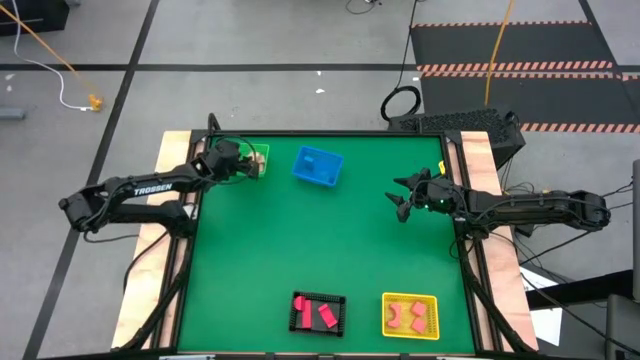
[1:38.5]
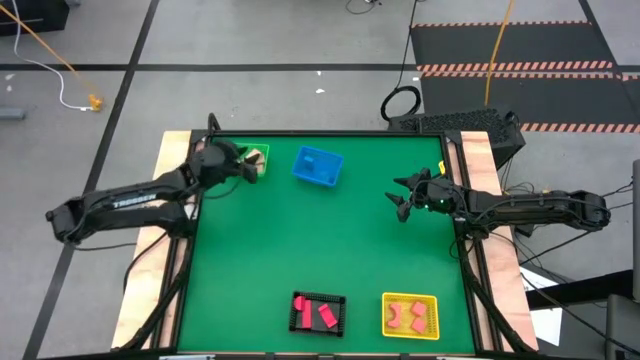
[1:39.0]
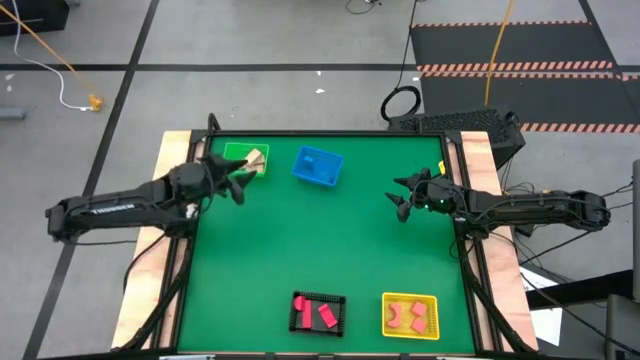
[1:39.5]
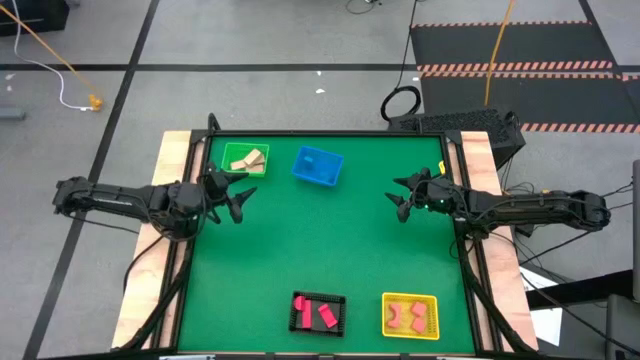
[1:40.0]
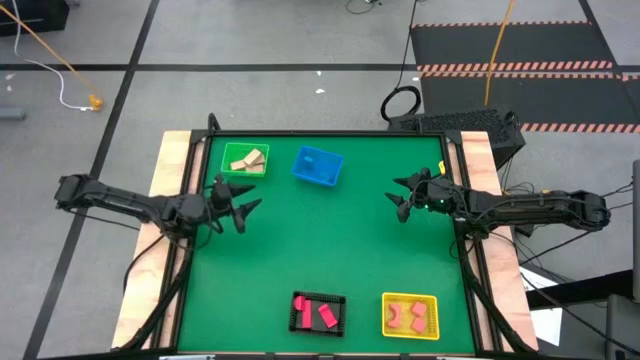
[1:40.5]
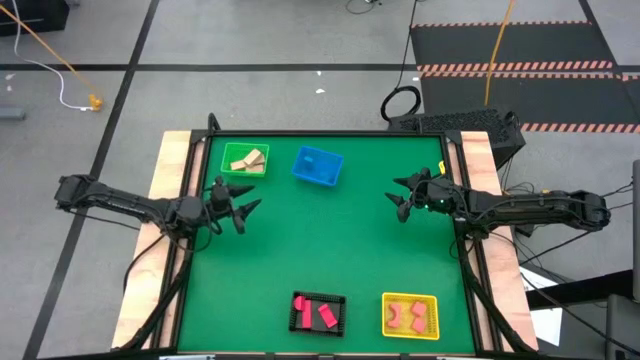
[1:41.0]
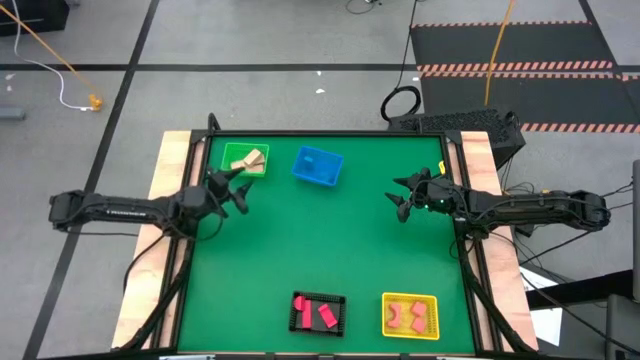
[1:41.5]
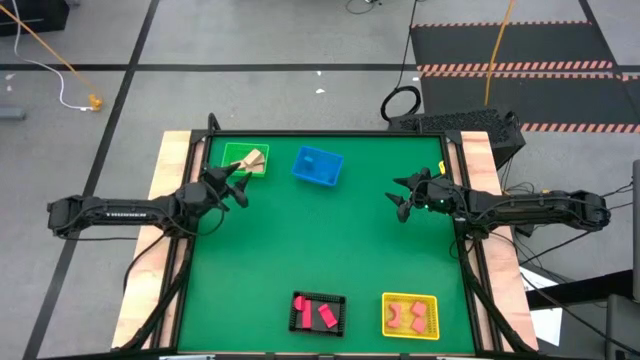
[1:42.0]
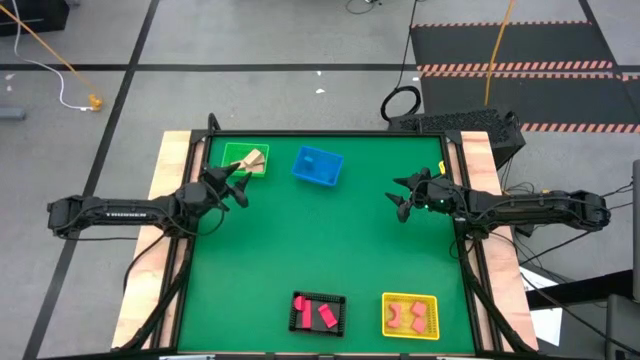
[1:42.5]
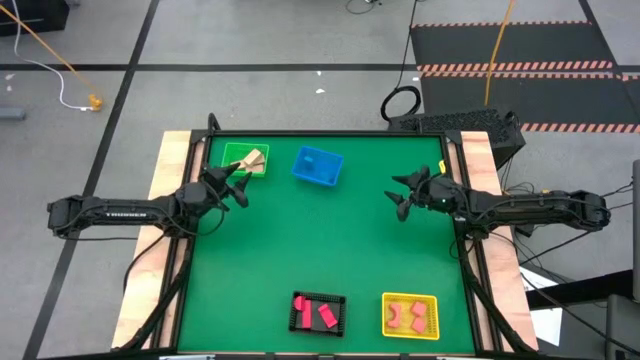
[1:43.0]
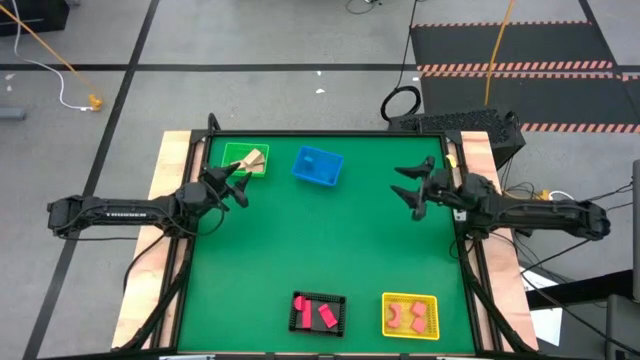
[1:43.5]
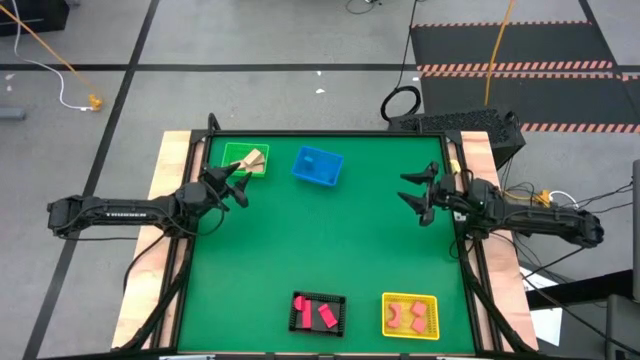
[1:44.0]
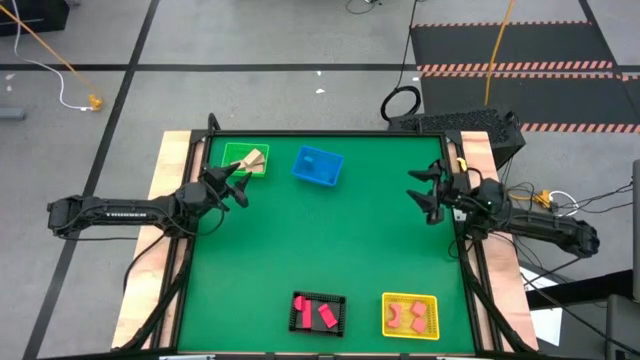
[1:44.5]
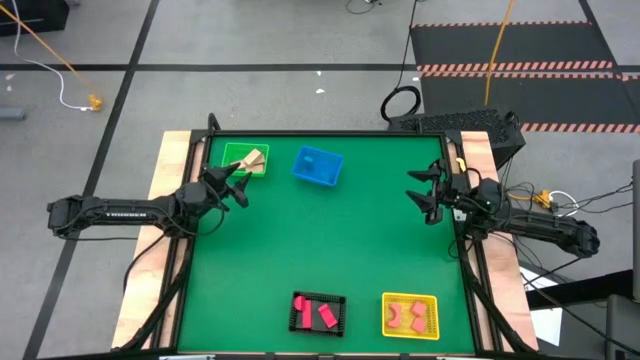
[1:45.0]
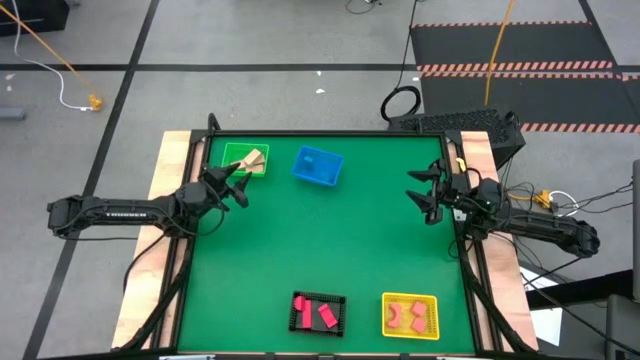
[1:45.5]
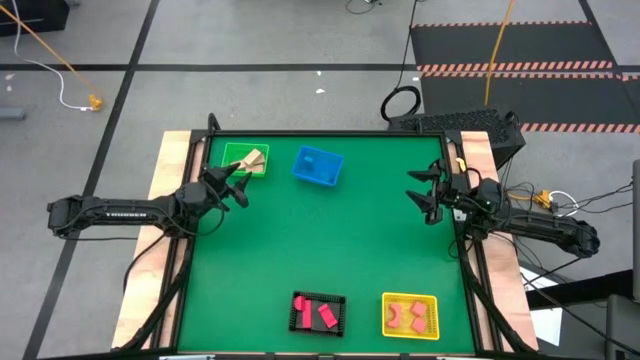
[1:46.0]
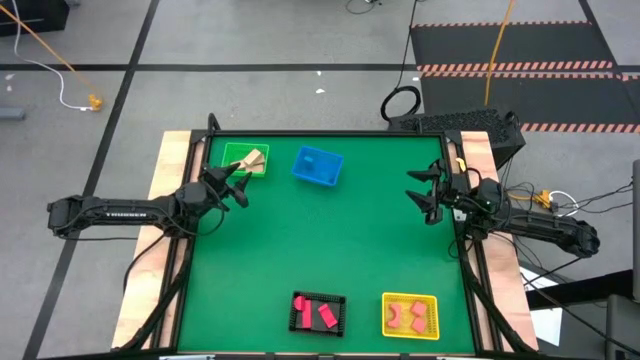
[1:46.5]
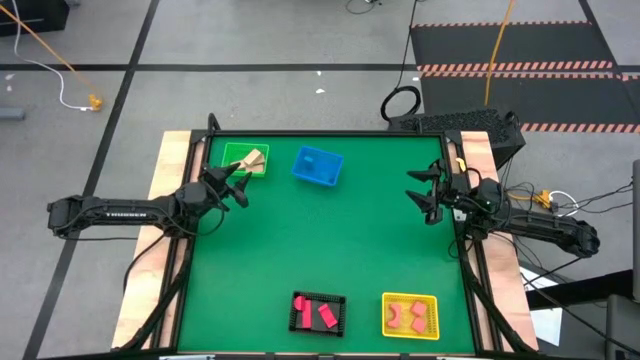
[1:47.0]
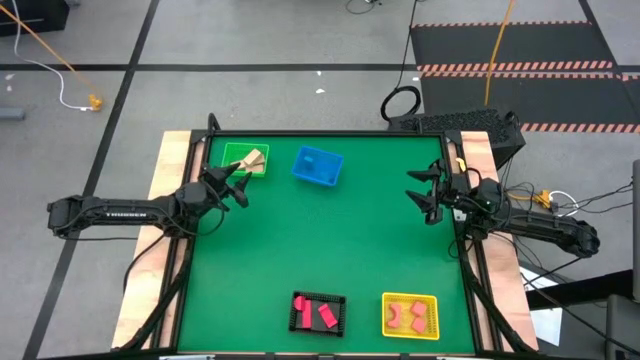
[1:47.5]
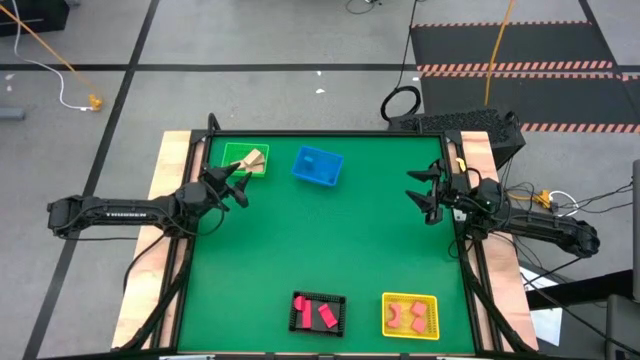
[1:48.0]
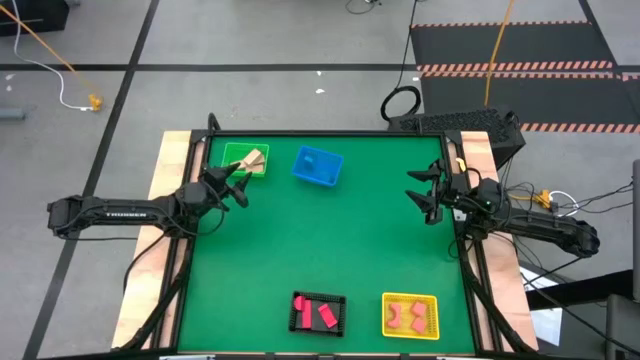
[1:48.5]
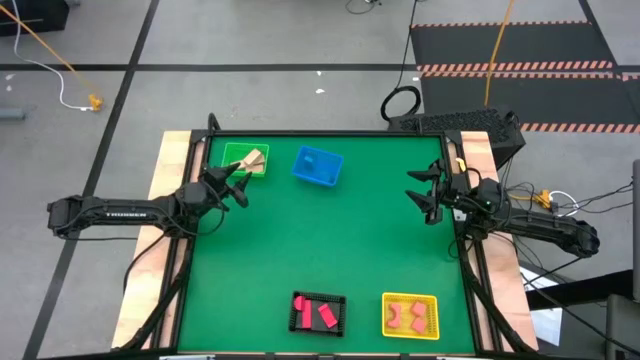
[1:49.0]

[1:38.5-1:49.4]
Task: Sort & place blocks by color
Return to Home Position

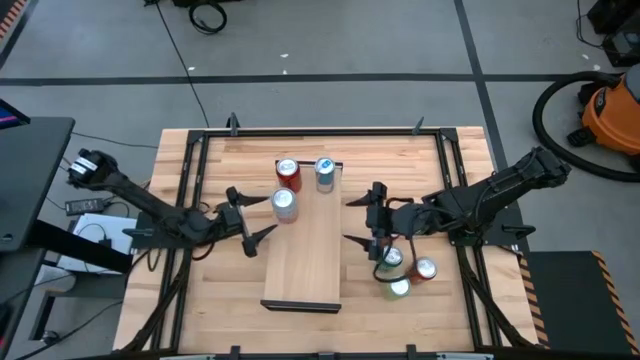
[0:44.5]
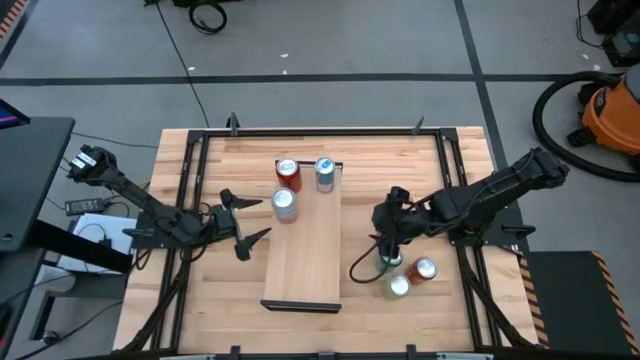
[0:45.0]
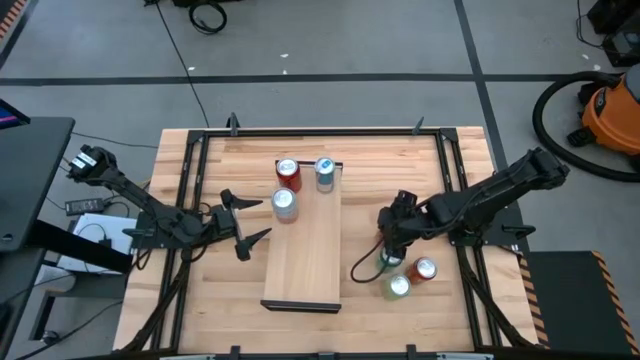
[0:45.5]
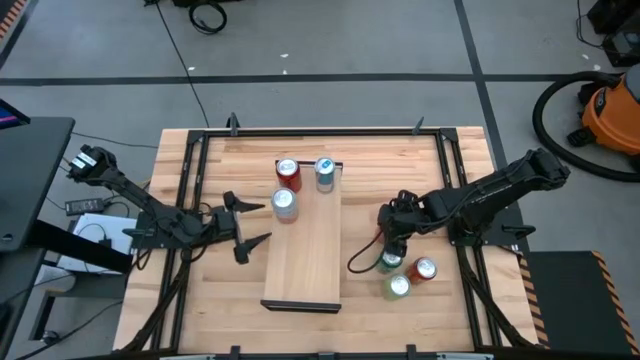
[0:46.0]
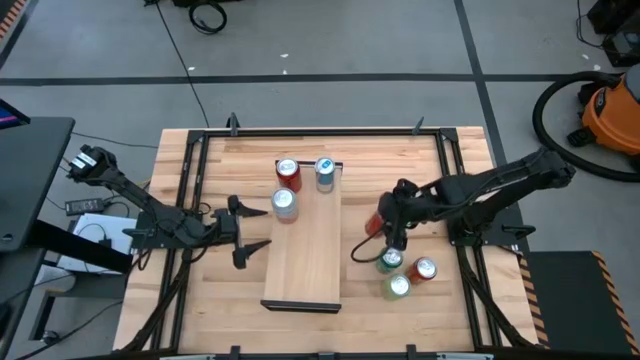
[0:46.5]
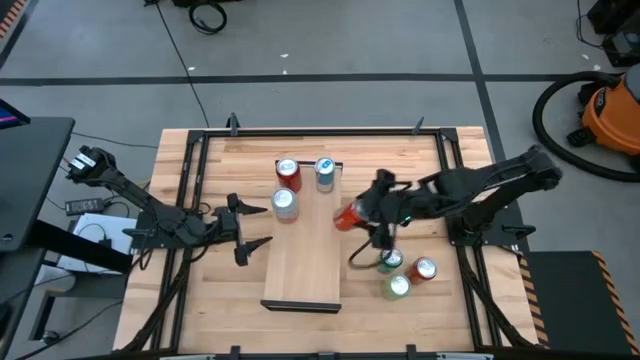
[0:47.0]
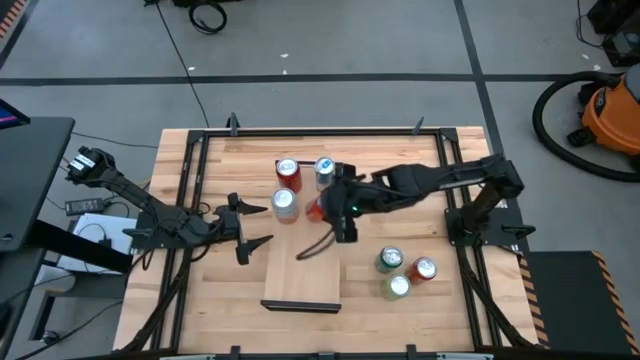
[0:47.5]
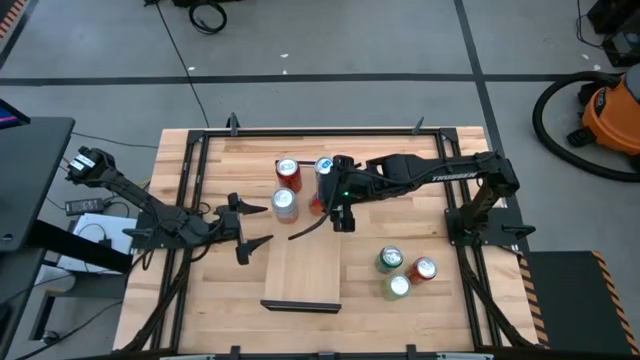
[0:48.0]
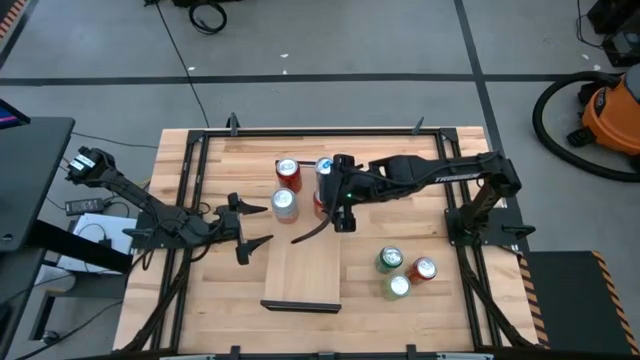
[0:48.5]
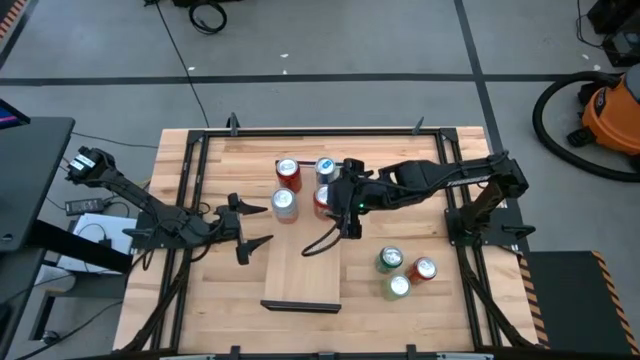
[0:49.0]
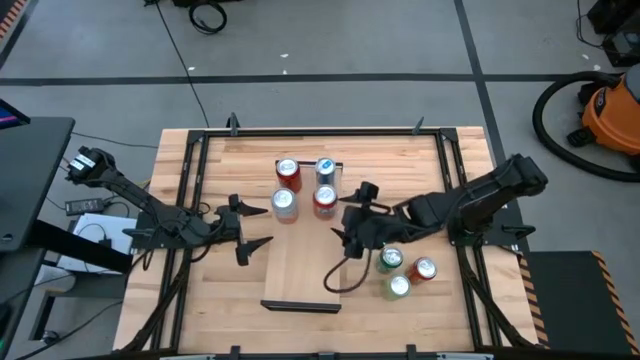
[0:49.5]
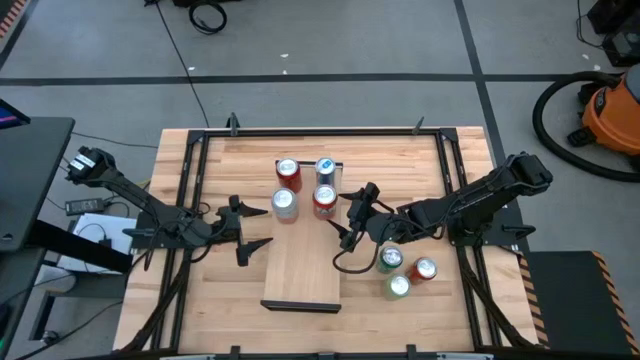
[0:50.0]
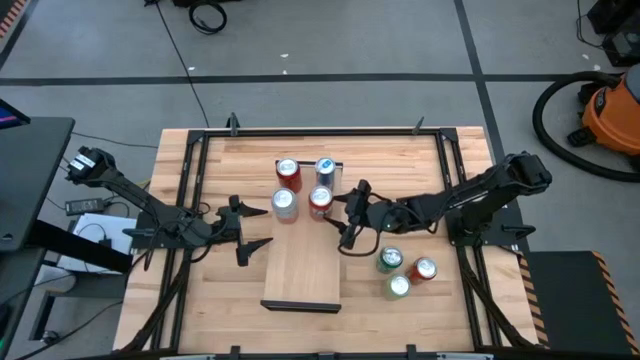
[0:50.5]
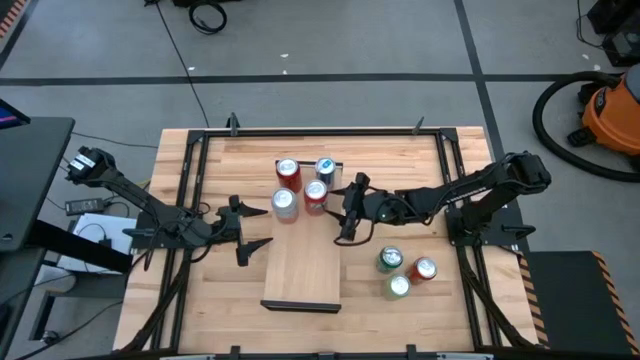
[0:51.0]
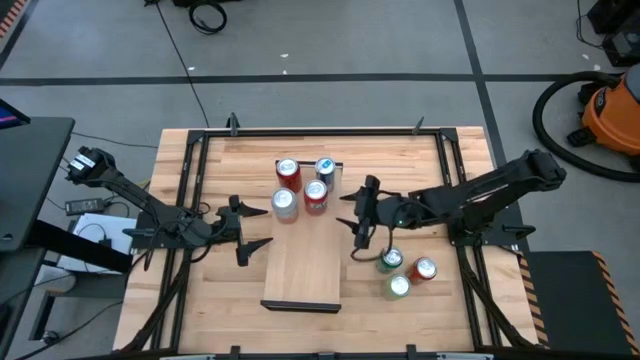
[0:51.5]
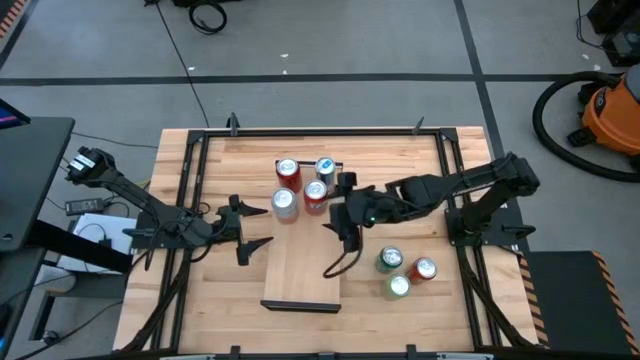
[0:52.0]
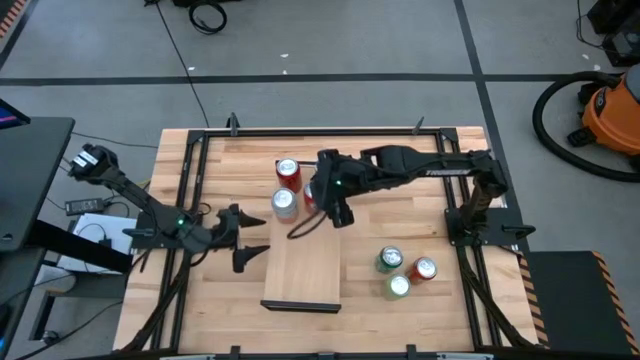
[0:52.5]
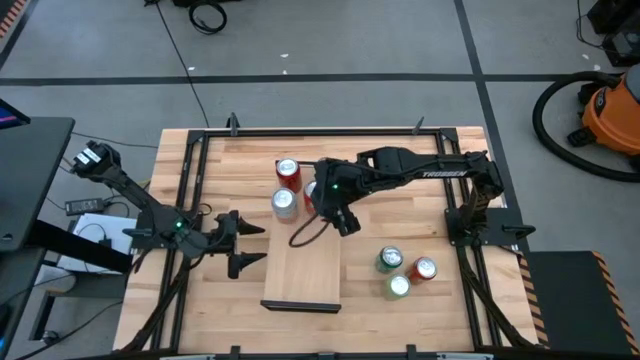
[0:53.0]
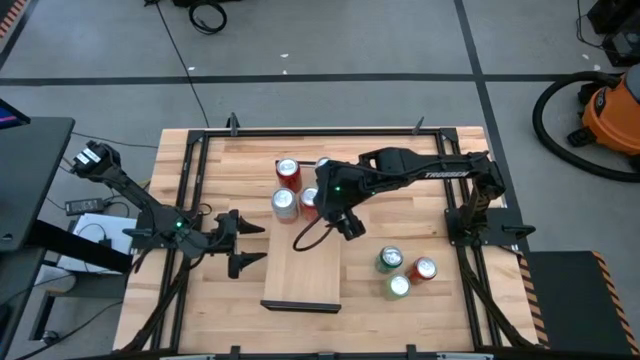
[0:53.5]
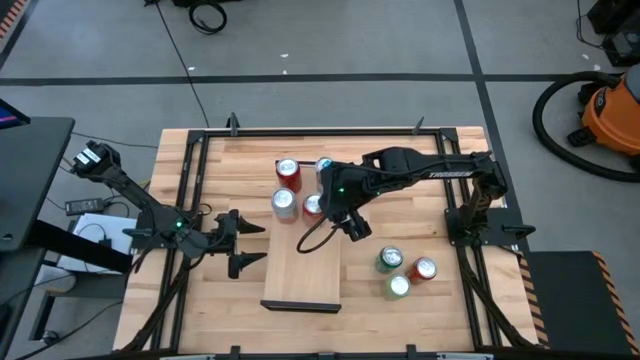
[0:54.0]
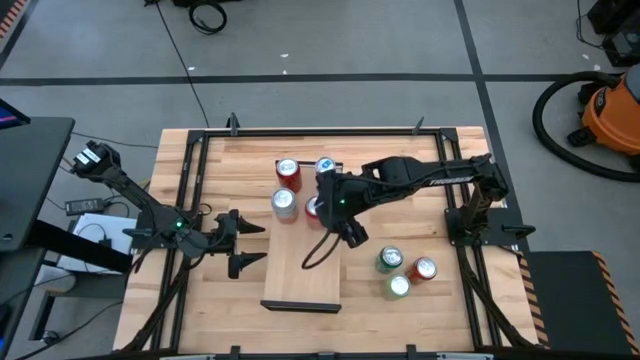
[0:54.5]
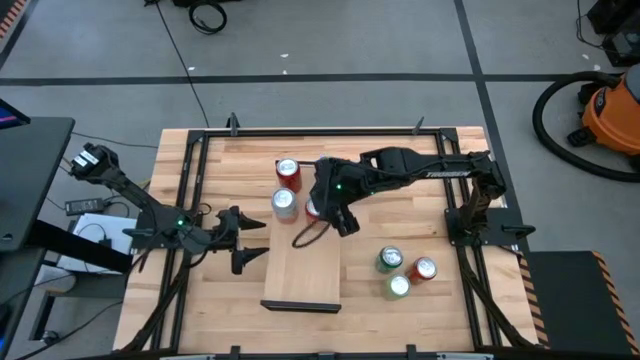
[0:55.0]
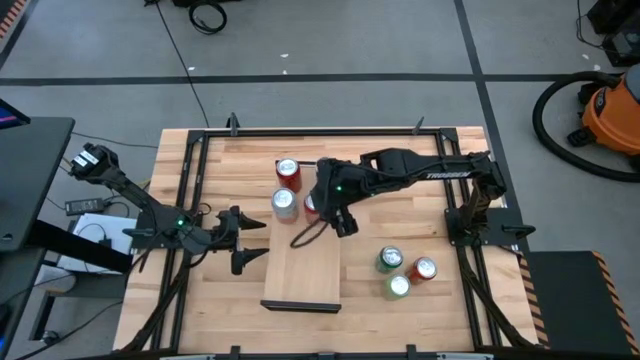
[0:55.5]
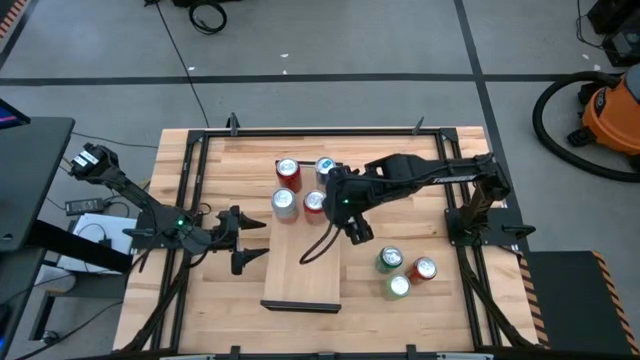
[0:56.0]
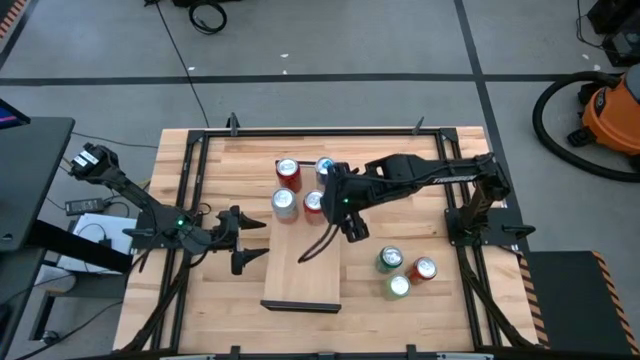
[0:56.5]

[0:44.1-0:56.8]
Task: Place canned beverage on shelf
Put the top orange soda can on the shelf
